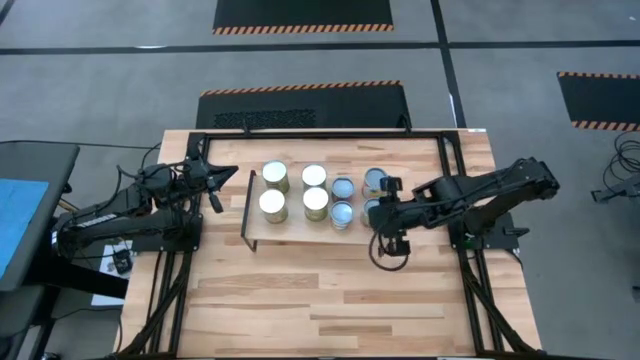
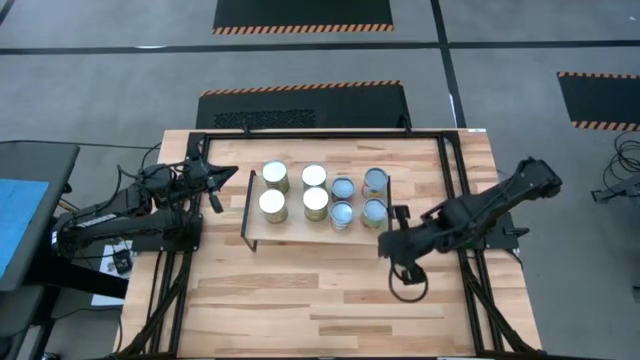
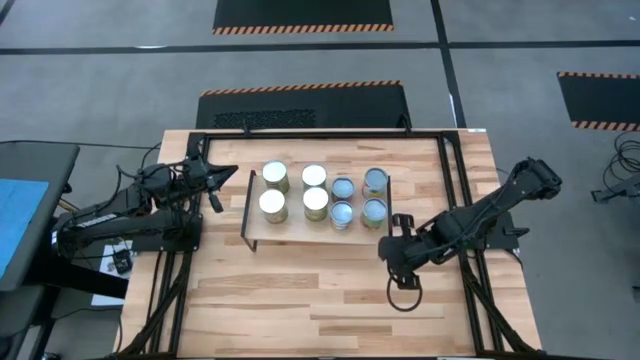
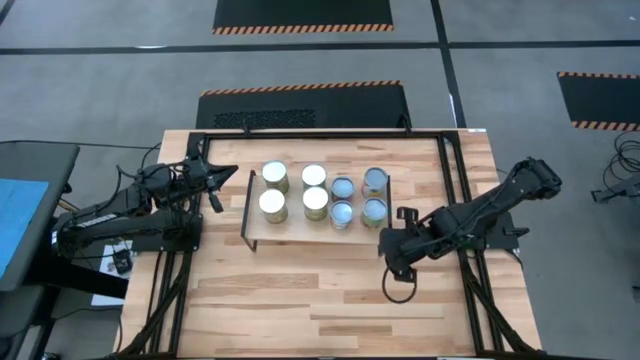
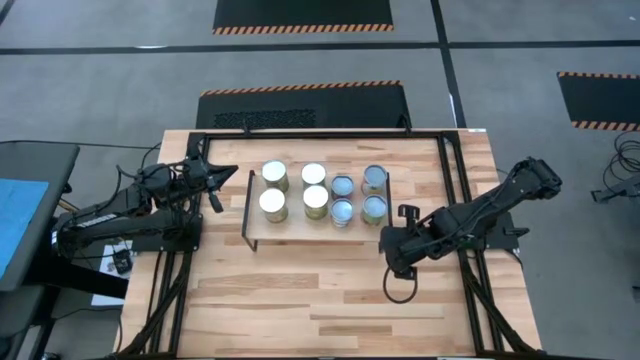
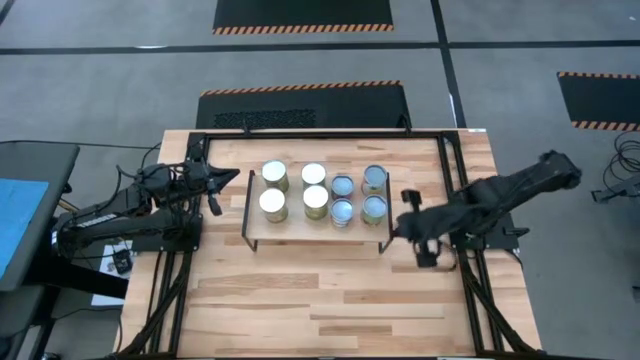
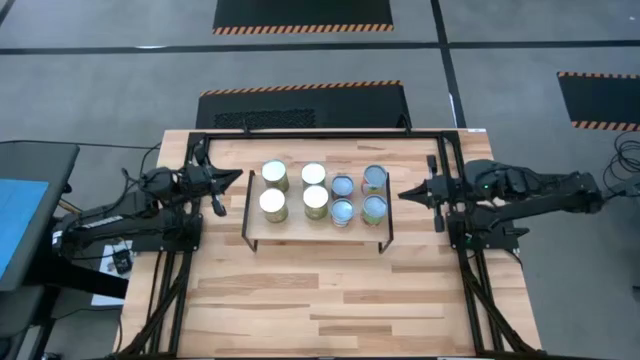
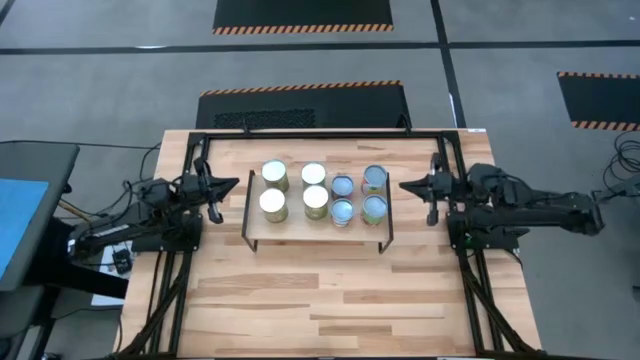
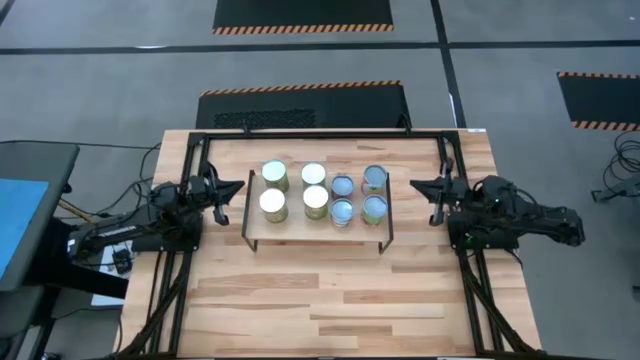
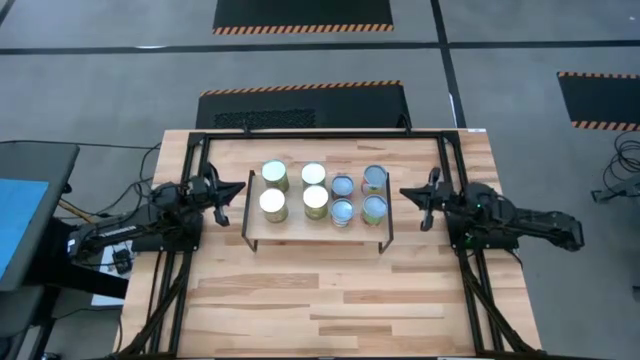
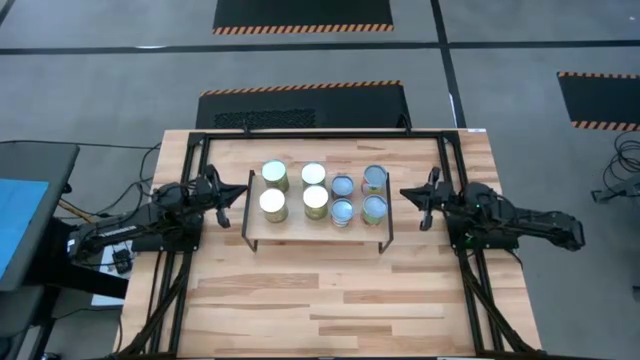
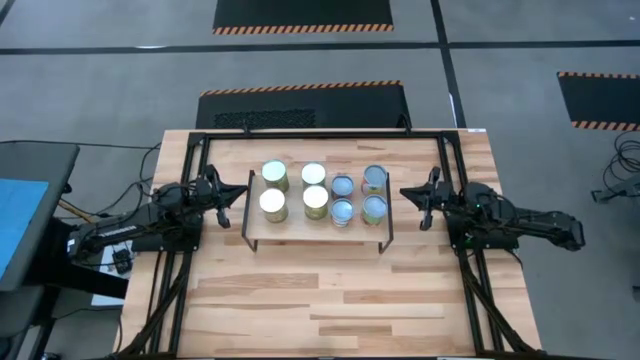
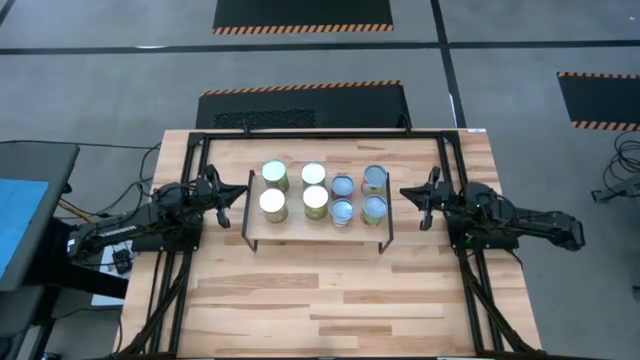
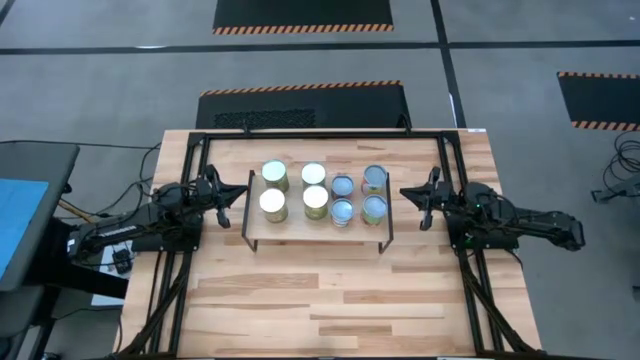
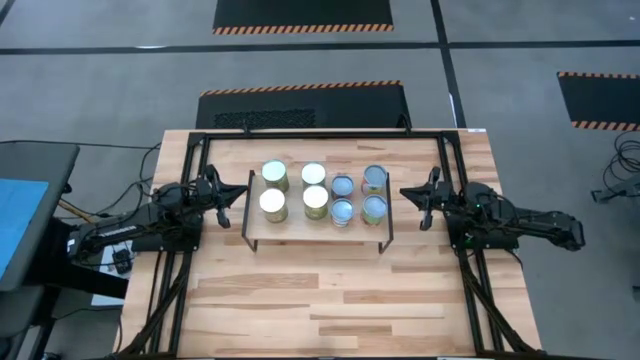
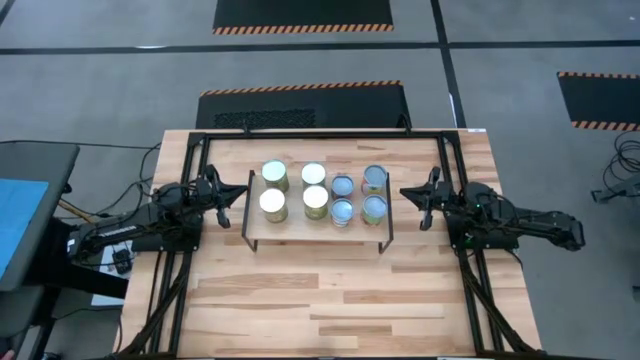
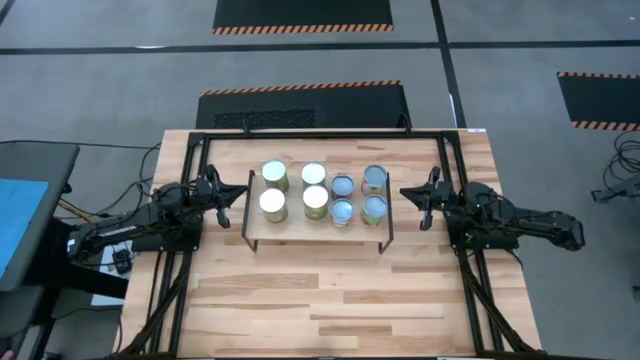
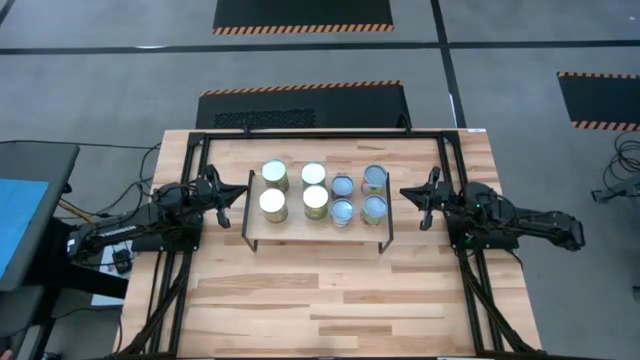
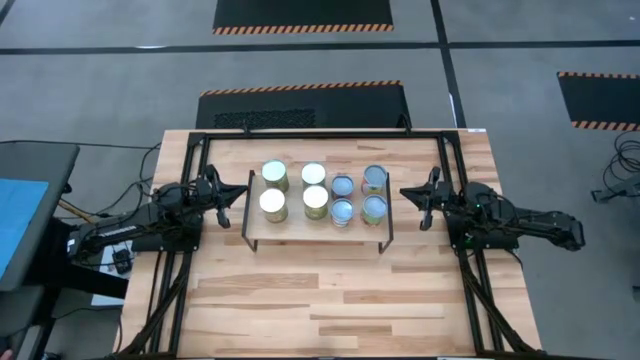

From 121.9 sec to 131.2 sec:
Task: Pick and place cans onto a shelf
Return to Home Position

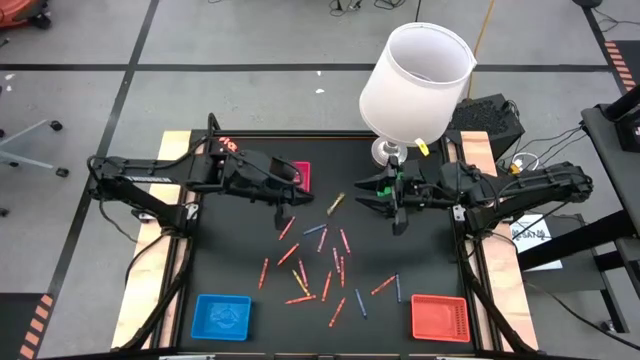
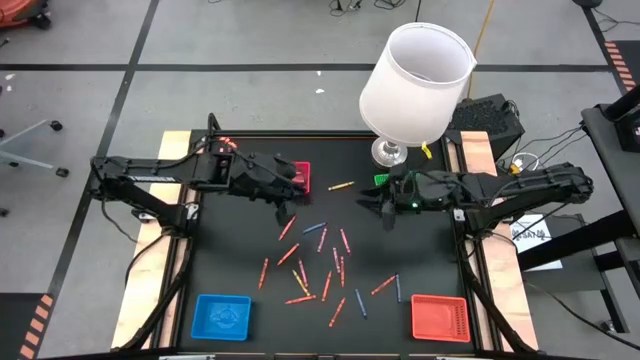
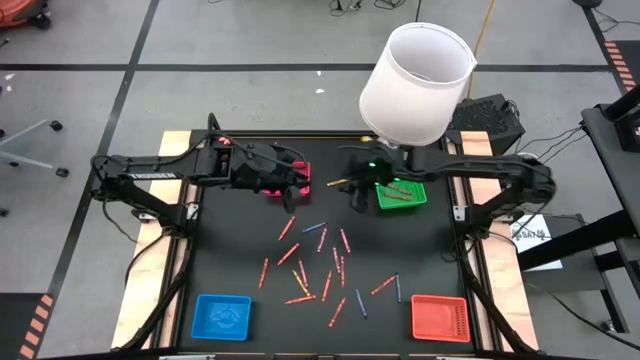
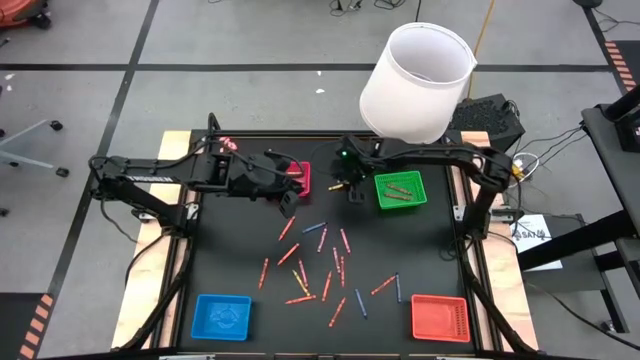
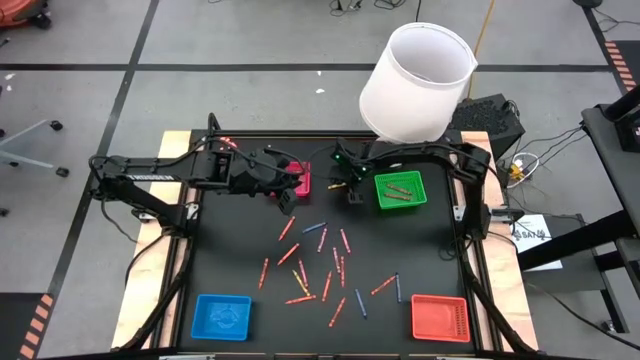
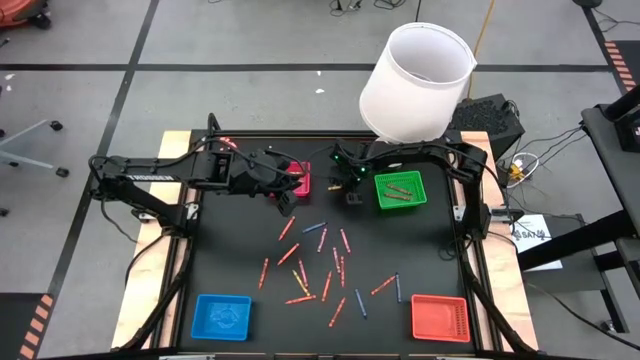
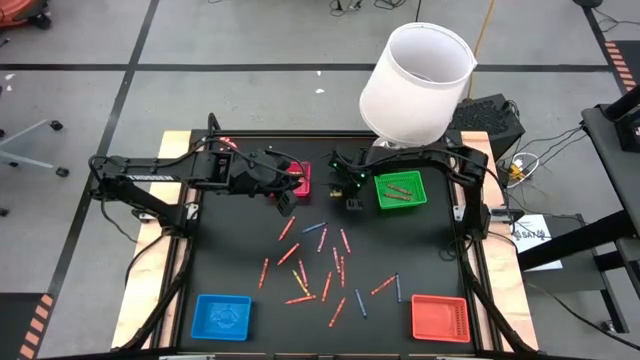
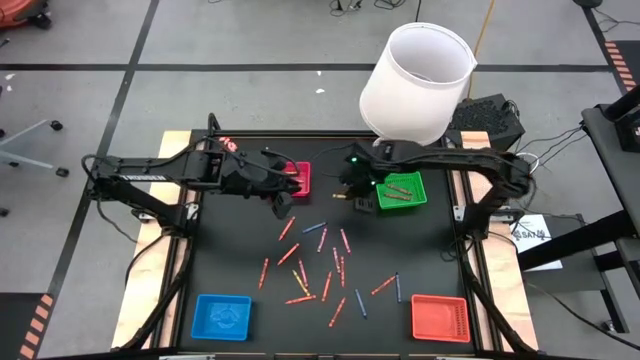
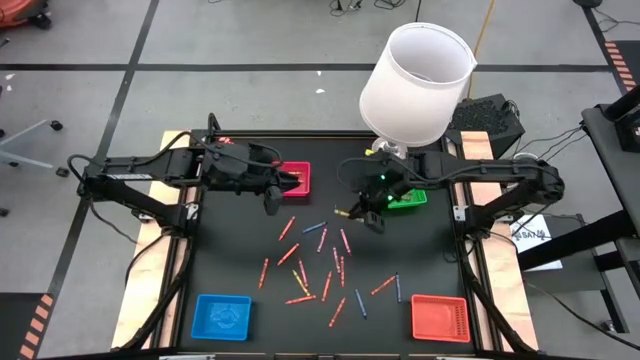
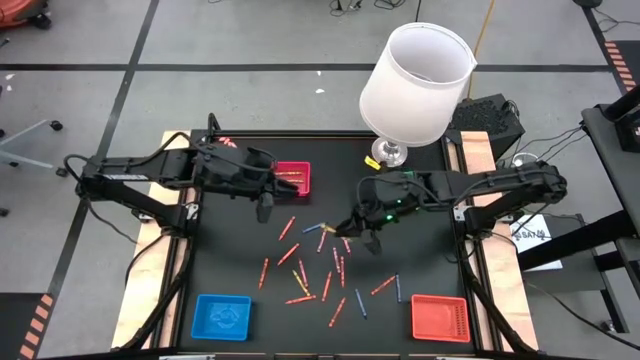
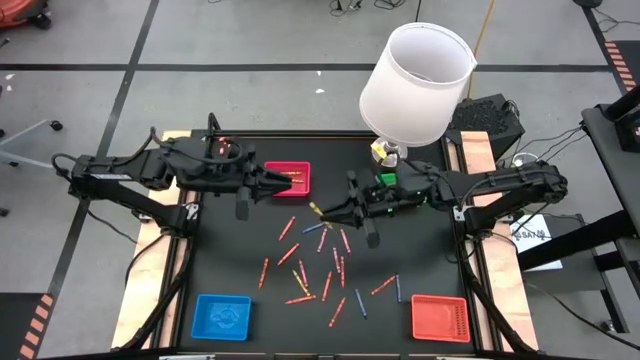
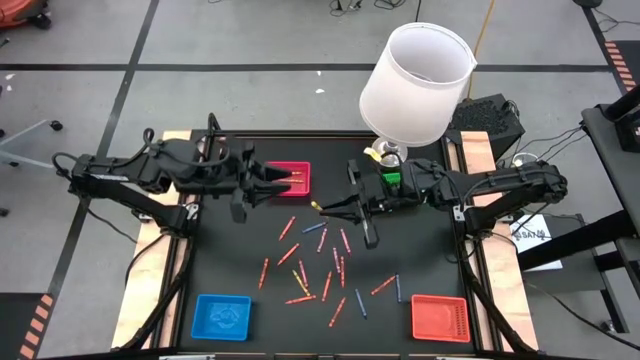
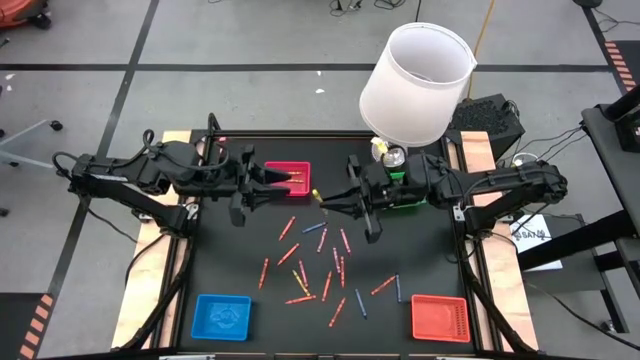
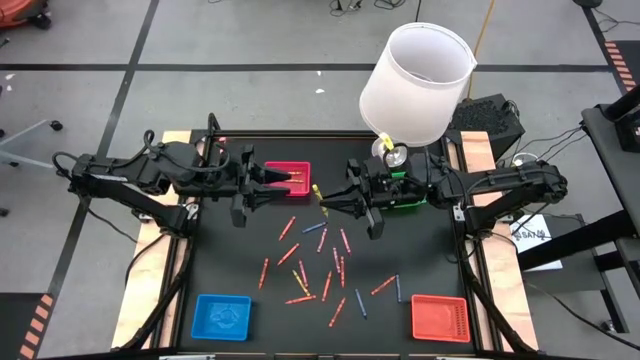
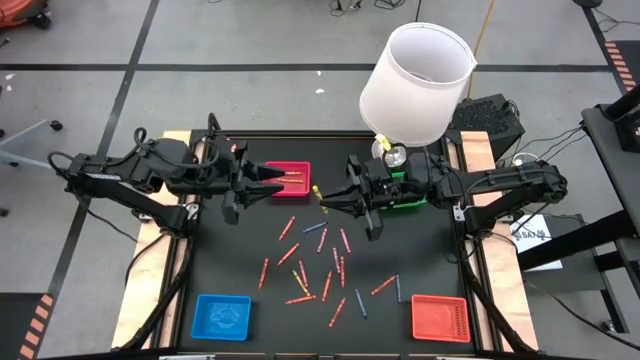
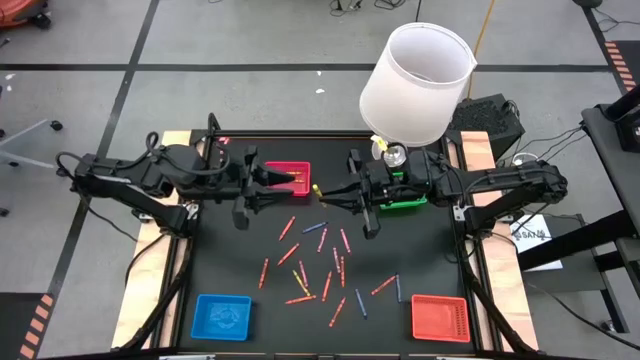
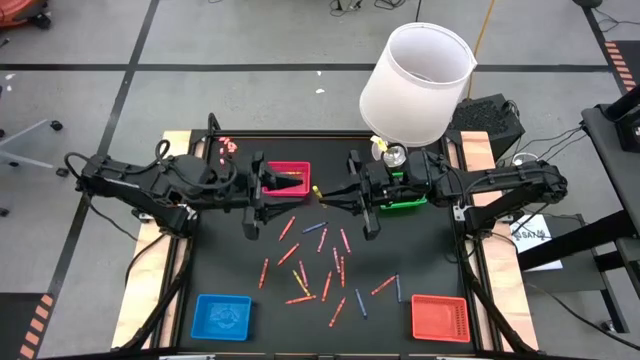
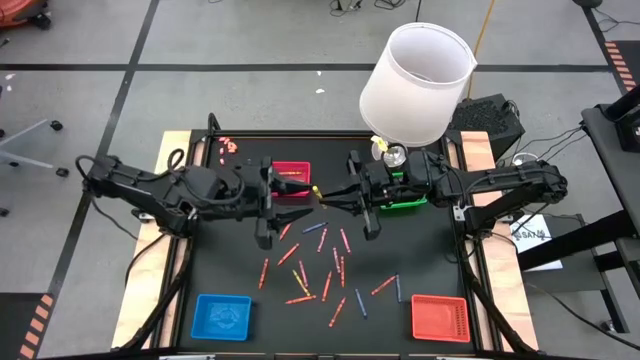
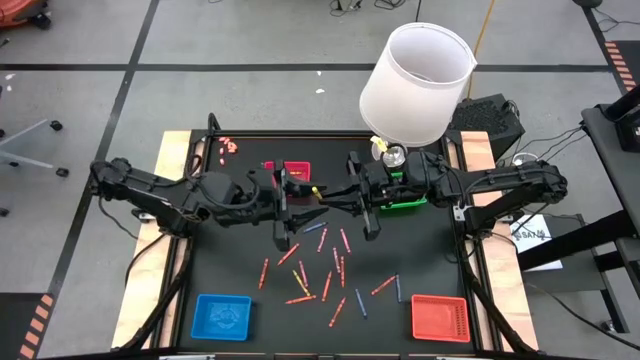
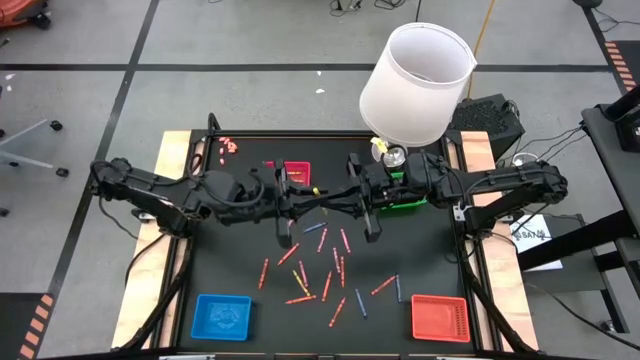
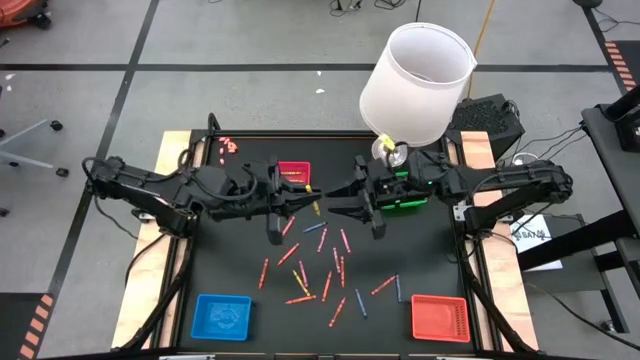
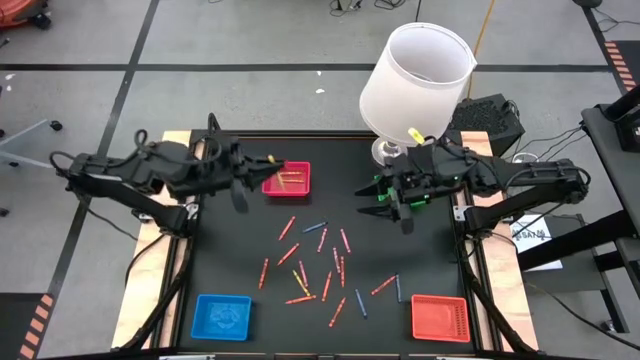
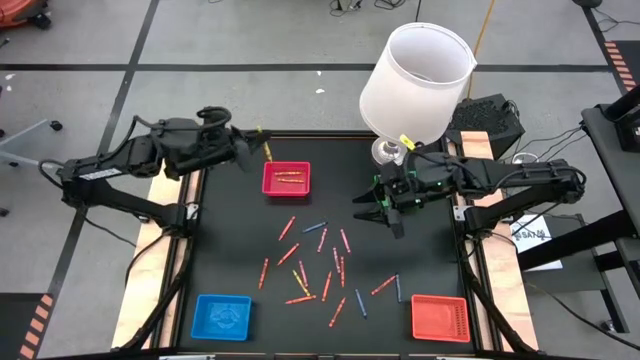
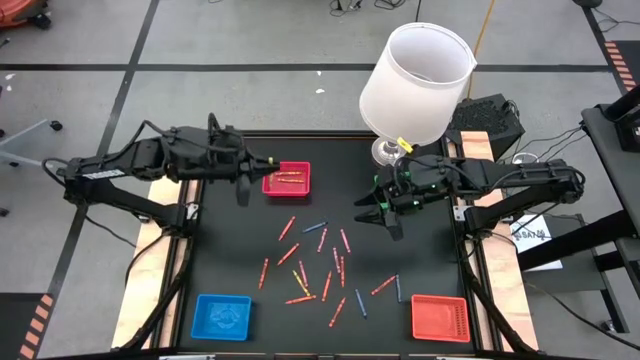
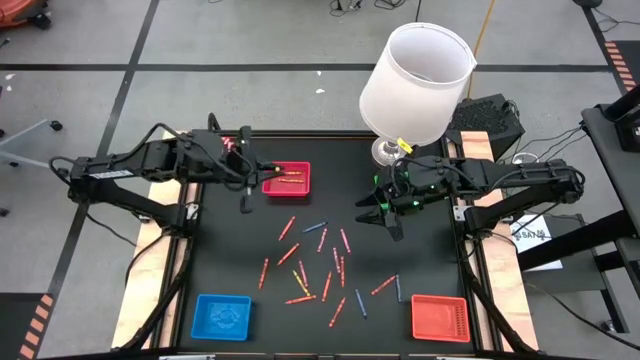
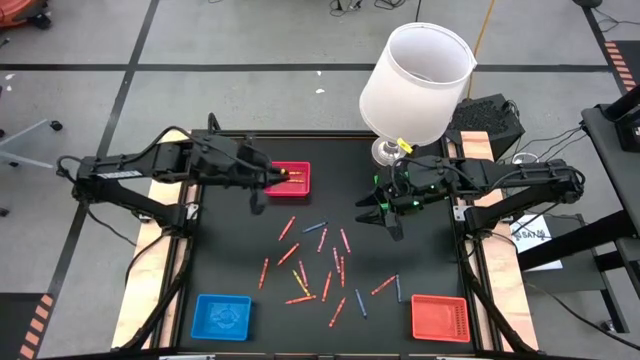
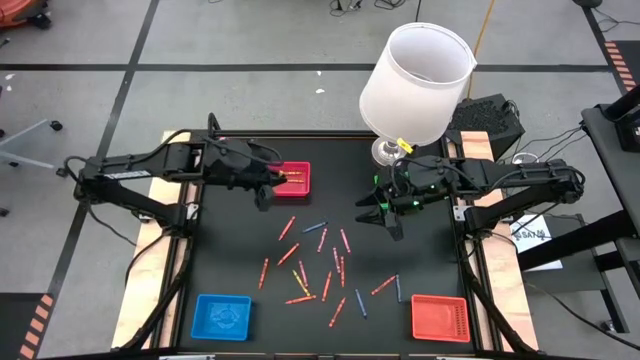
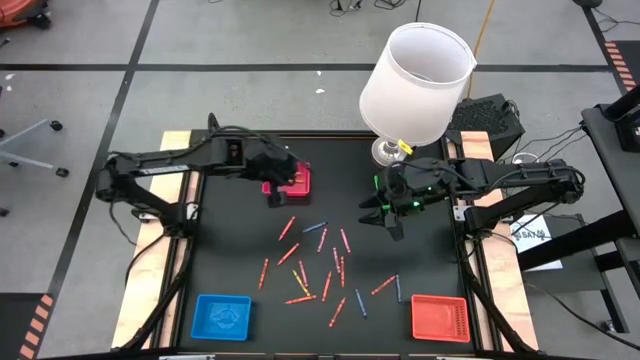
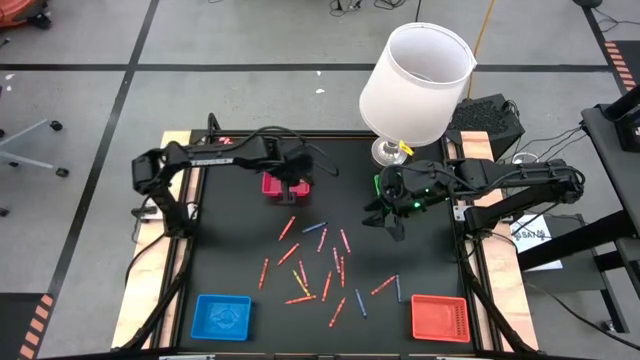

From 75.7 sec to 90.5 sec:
Task: Sort crayons
Put the yellow crayon into the red basket
